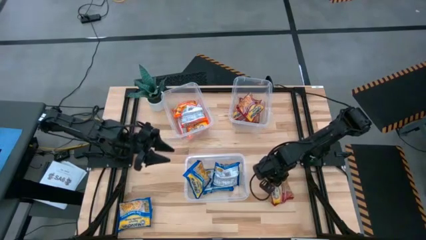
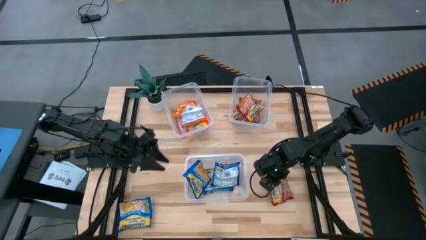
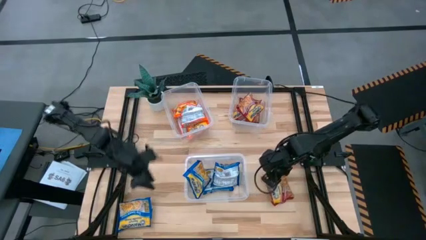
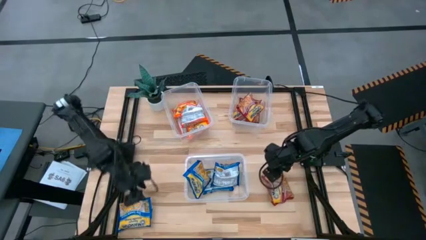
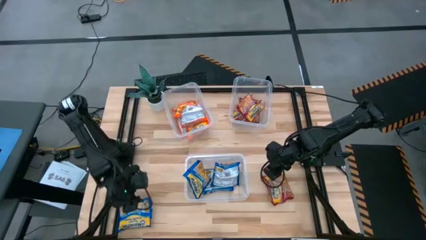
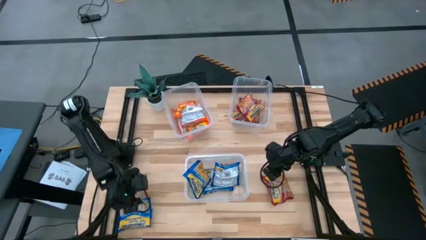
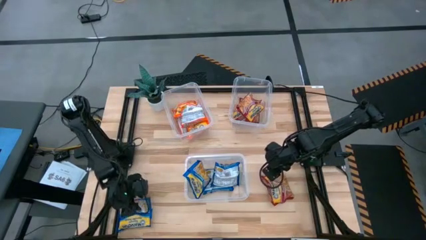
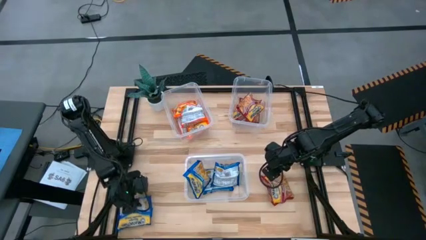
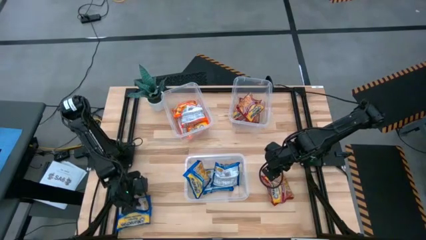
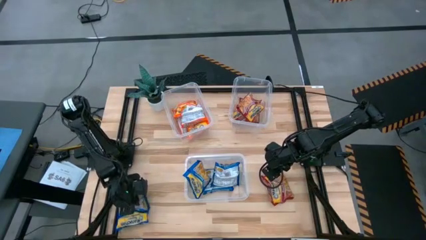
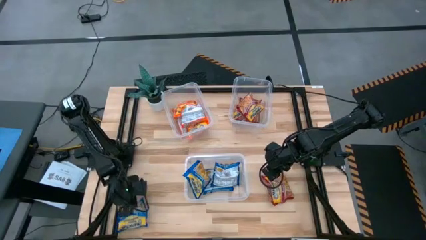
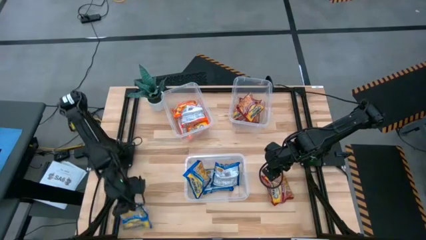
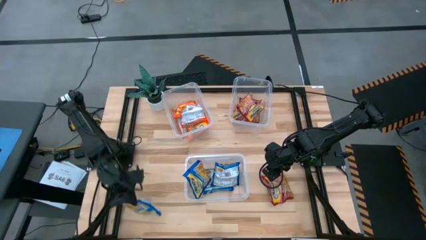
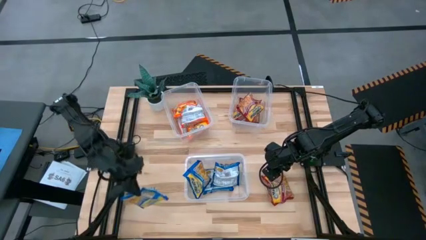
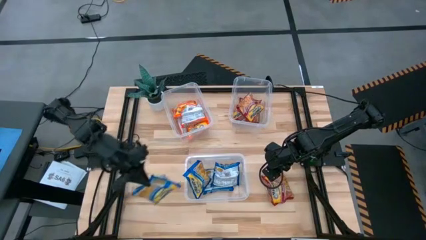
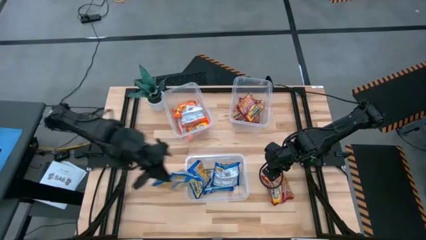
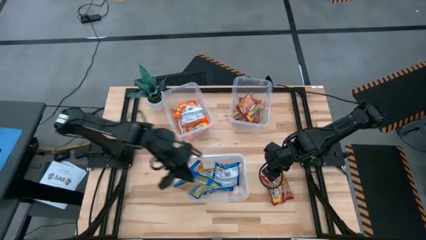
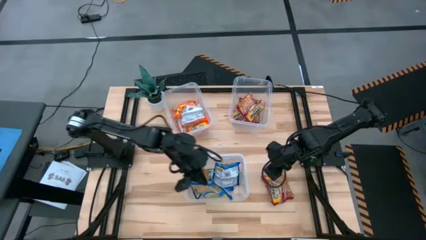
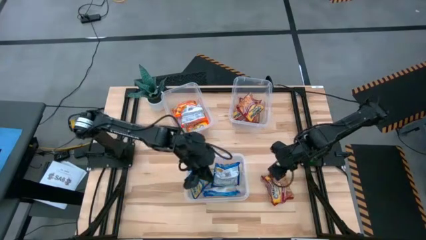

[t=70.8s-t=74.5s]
Task: Sort Maruchan noodles
Put the blue bag into the bottom transparent bin

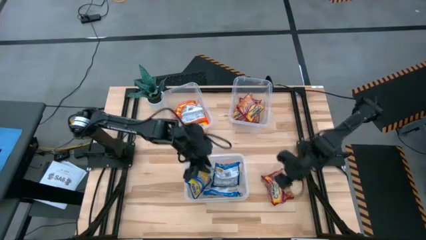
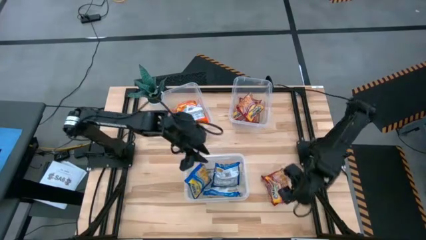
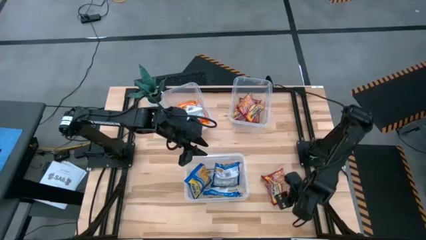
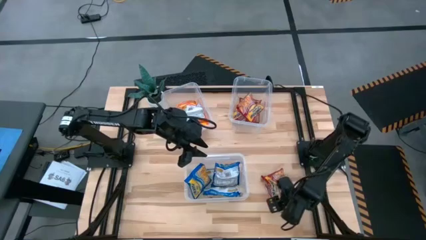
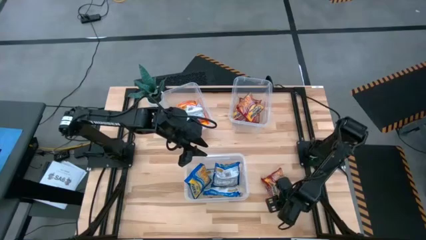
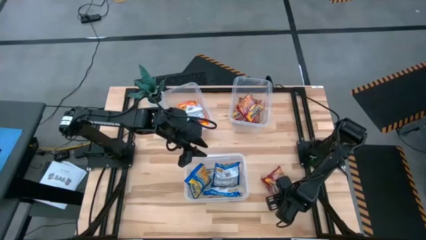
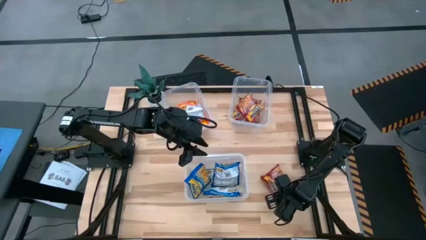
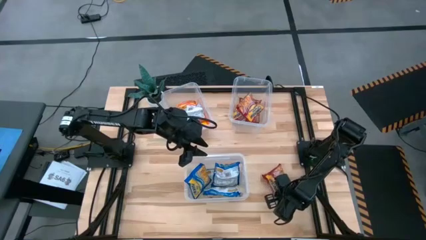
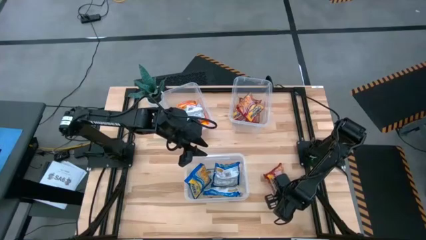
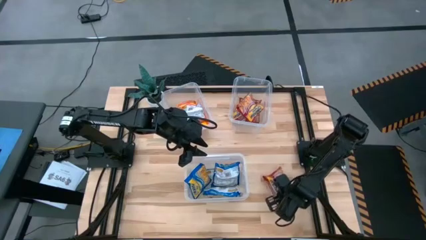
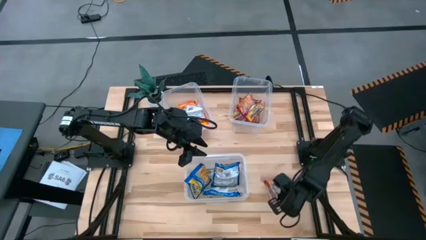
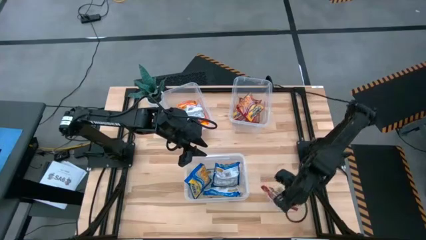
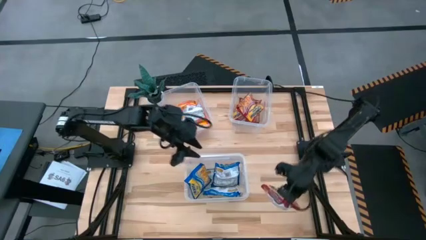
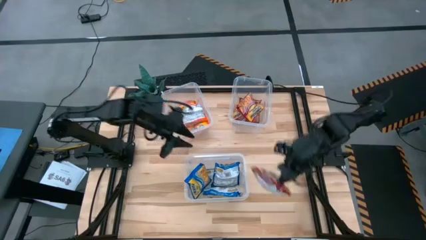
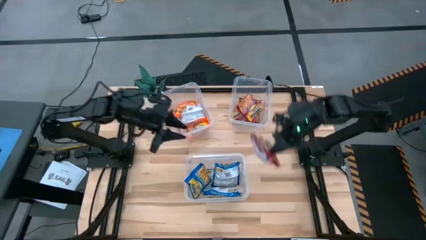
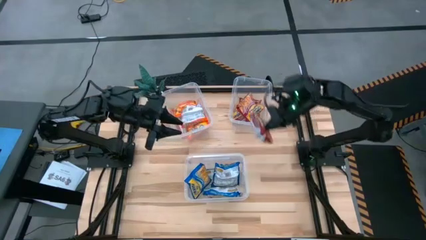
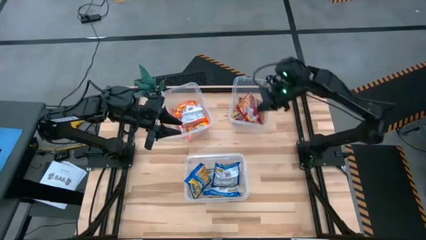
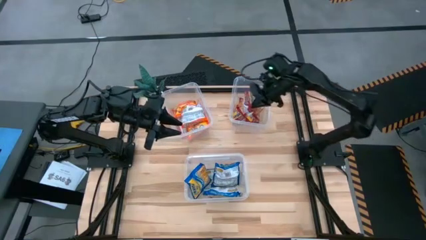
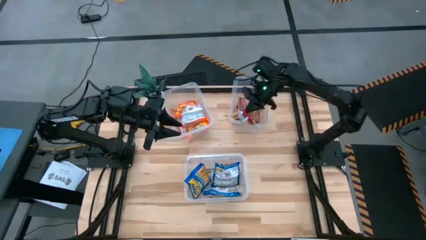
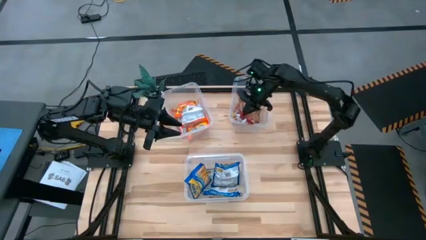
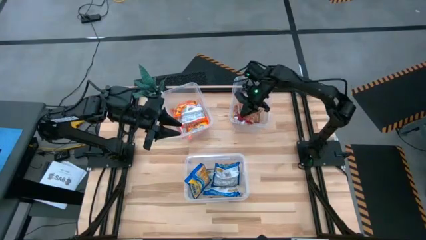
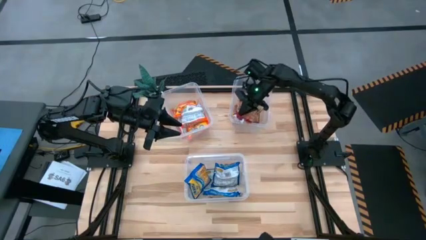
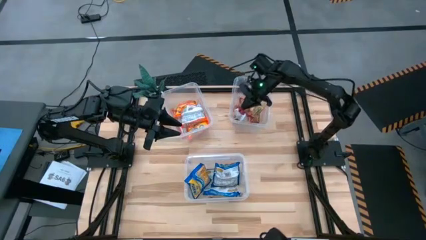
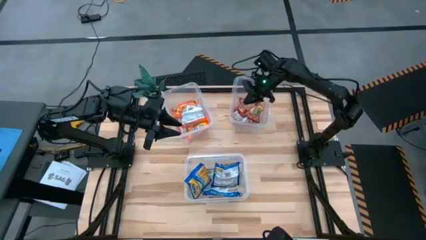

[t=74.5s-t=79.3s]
Put the red bag into the top right transparent bin

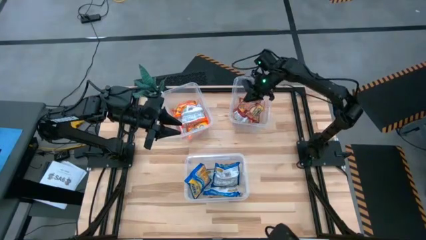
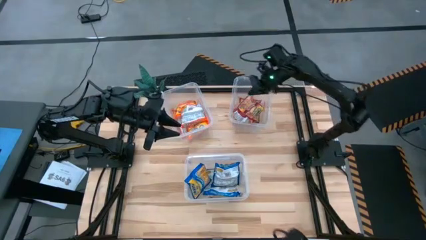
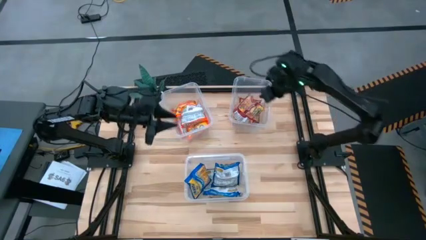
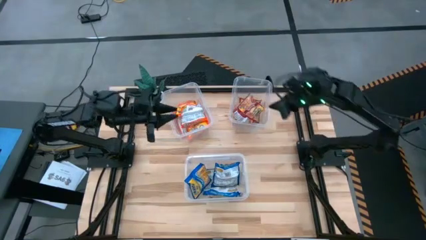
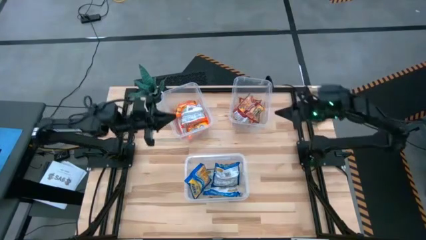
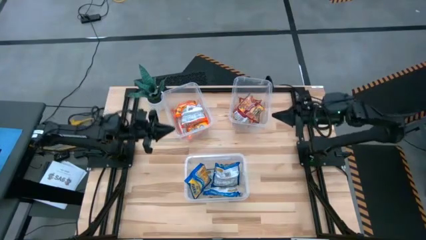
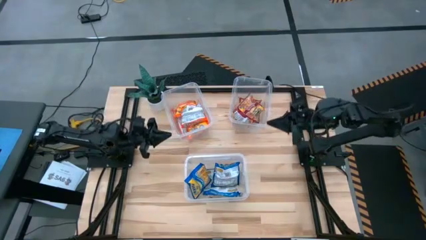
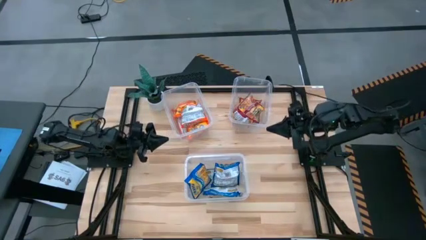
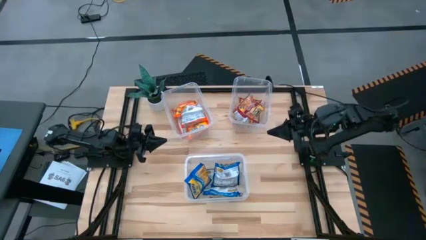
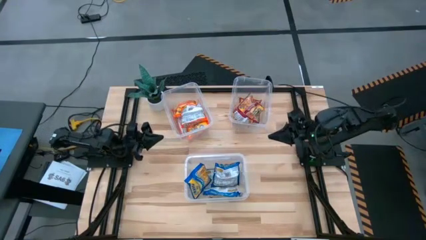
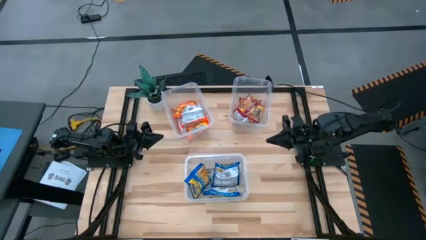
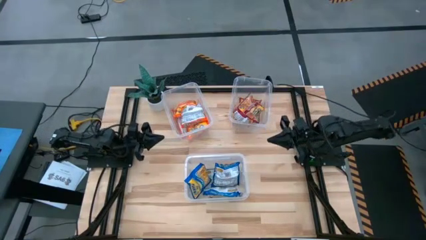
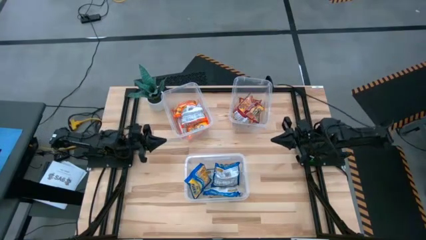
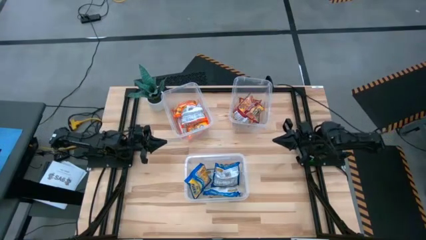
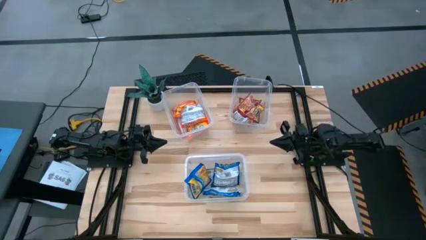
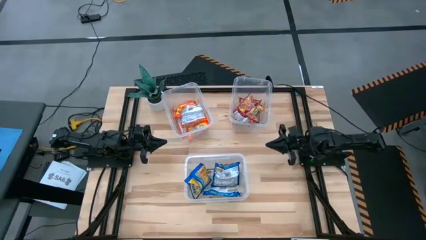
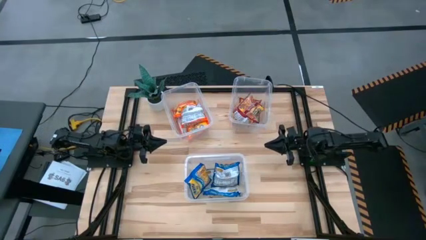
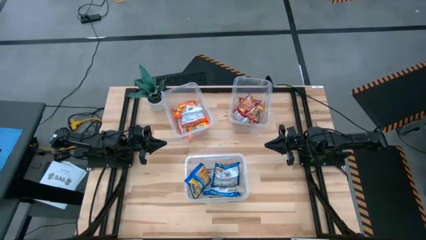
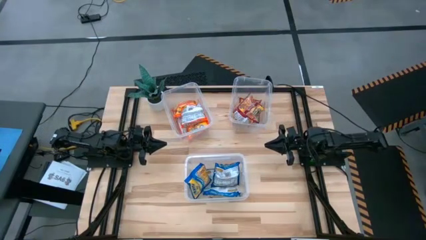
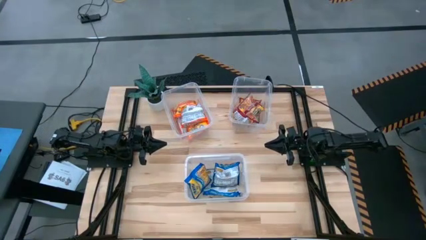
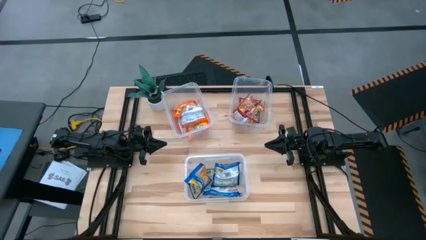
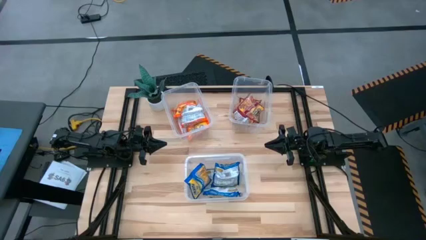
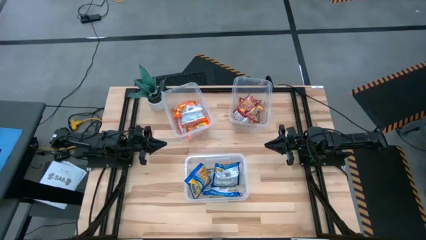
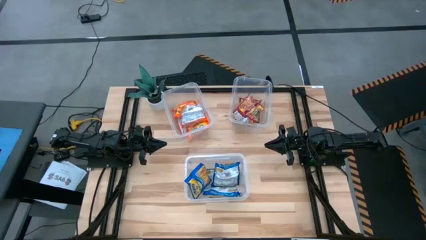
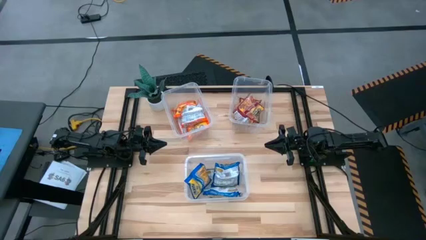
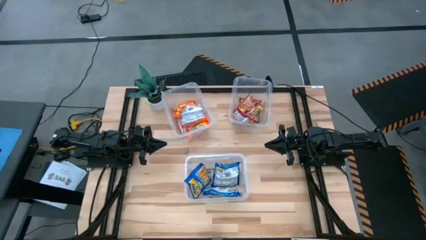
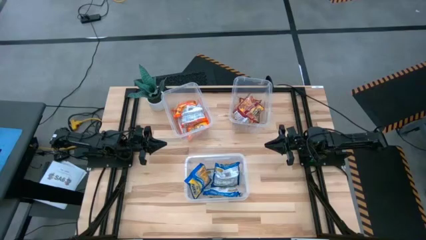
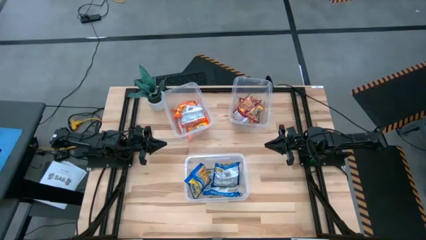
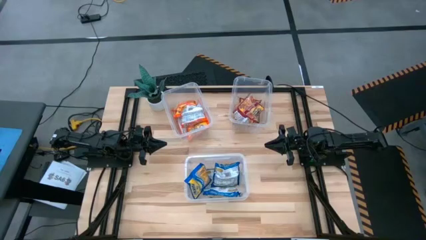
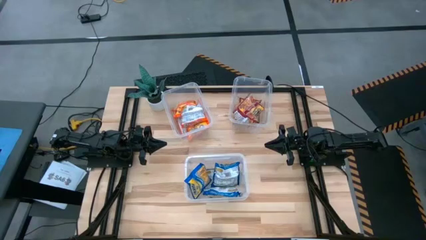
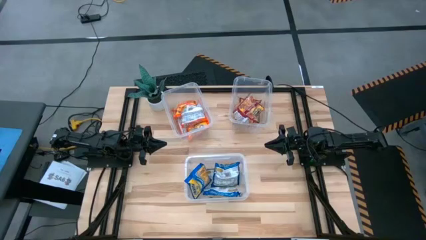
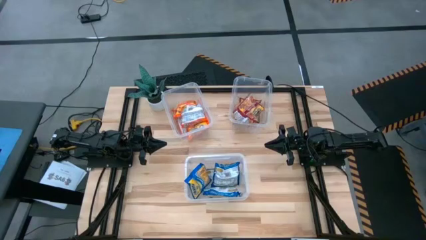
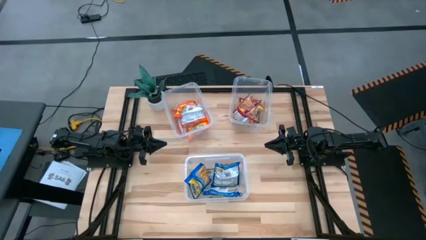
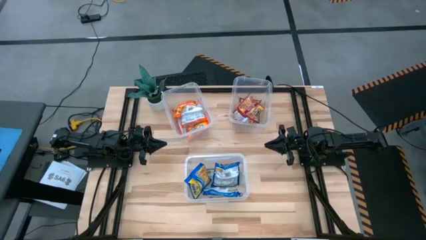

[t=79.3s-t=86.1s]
Return to Home Position
